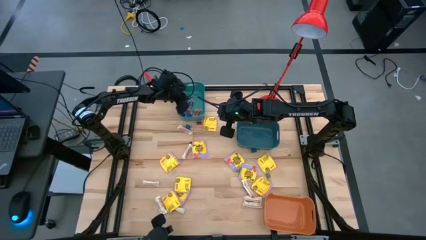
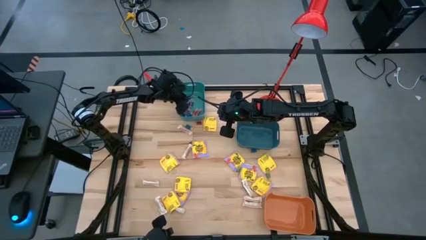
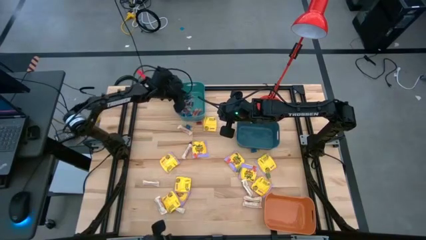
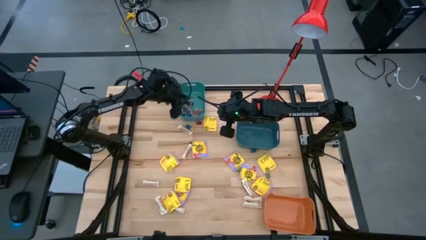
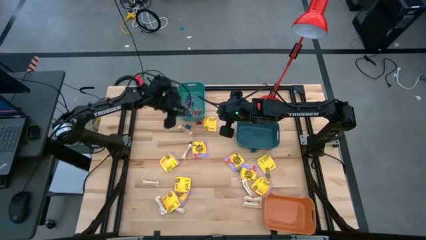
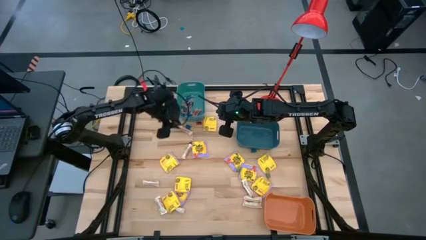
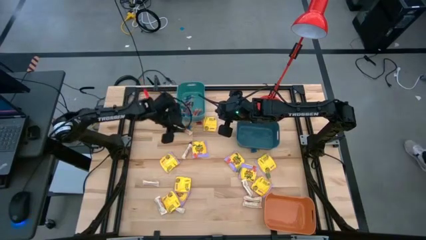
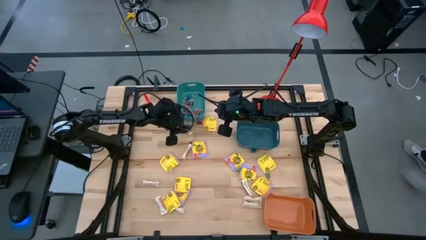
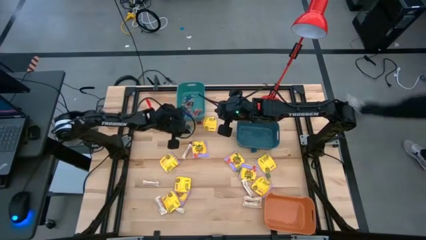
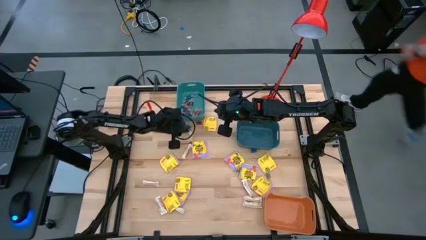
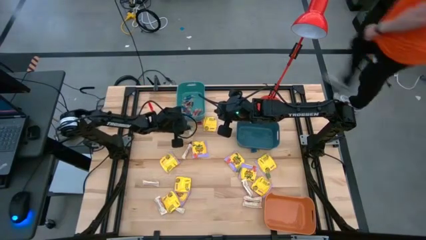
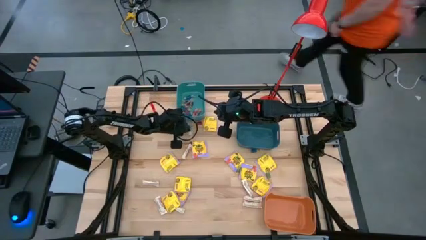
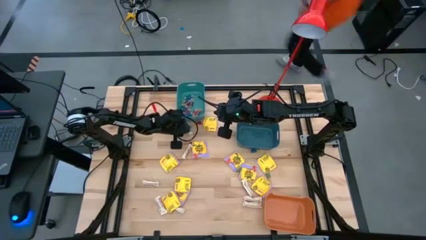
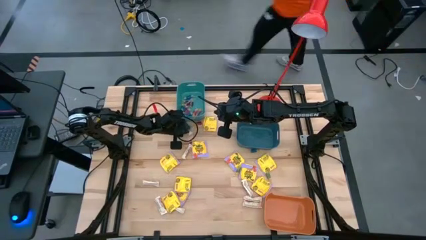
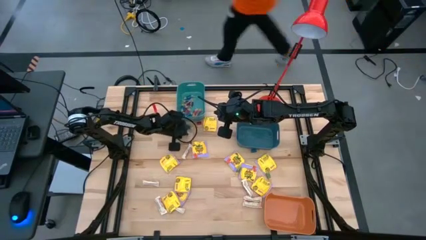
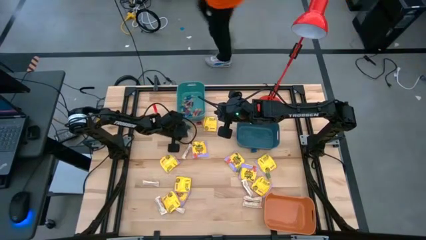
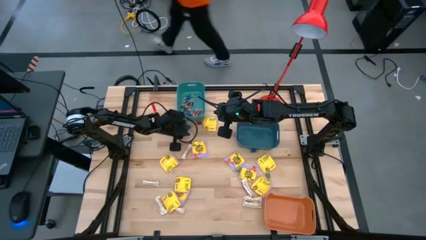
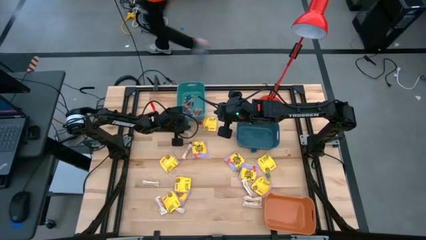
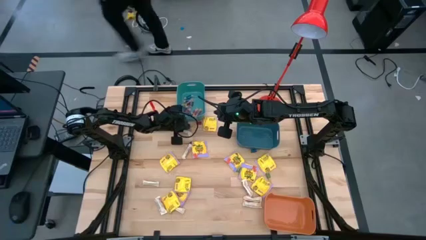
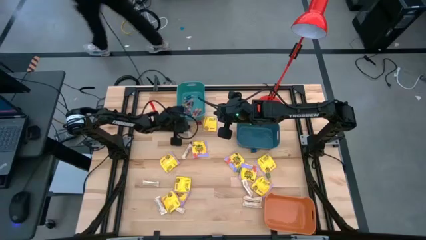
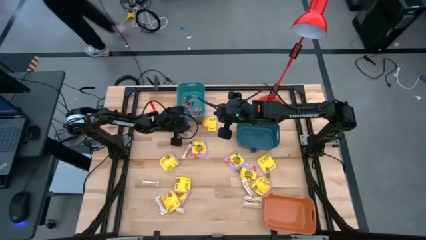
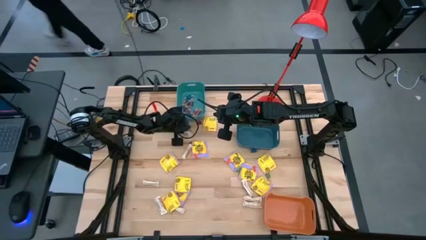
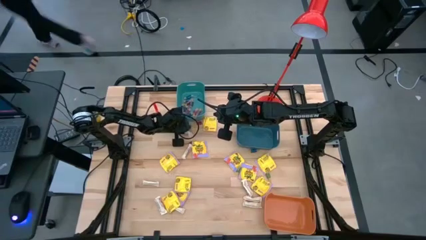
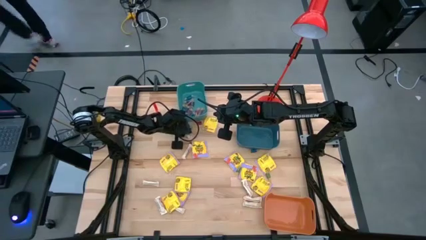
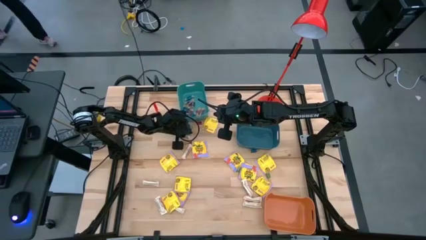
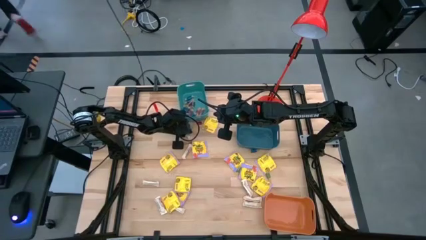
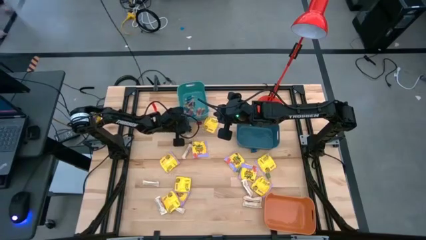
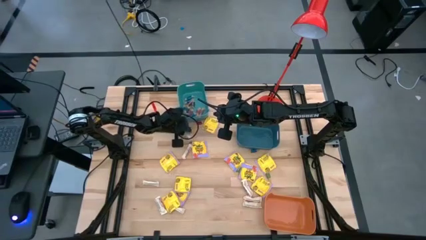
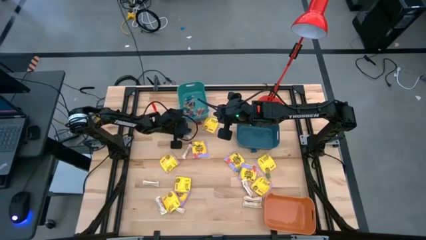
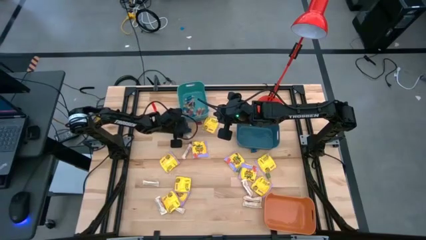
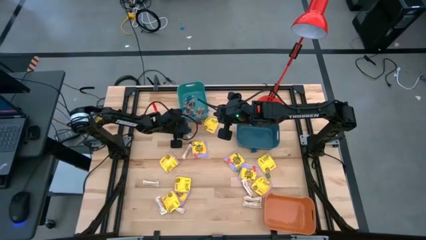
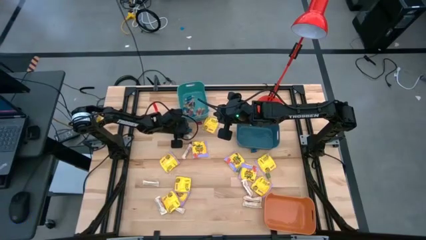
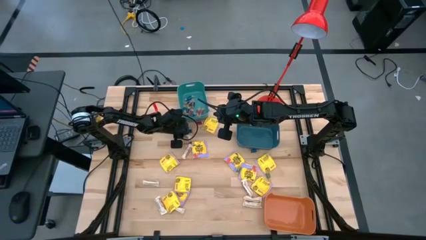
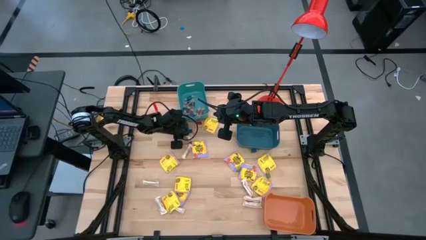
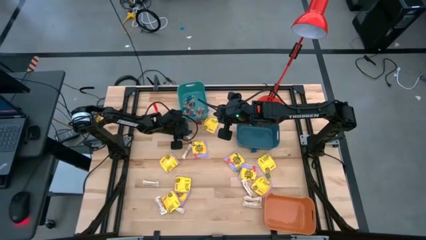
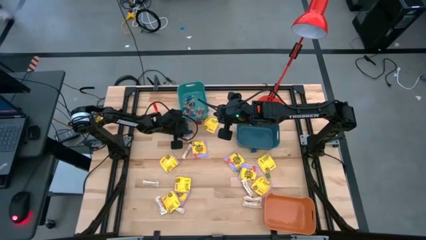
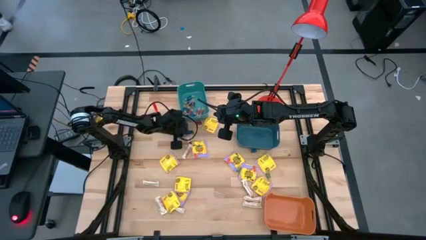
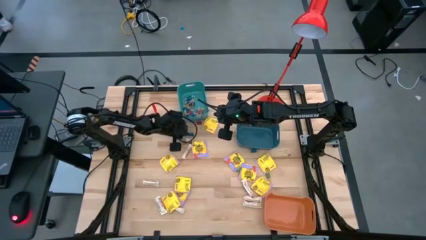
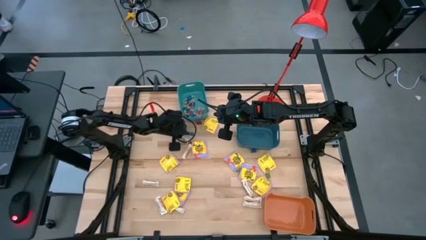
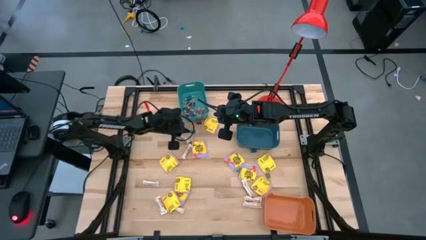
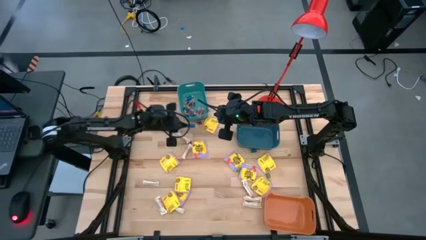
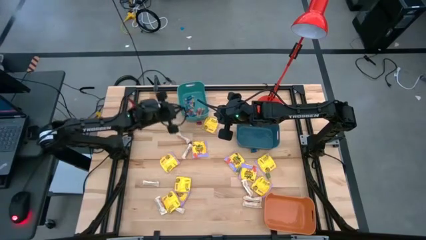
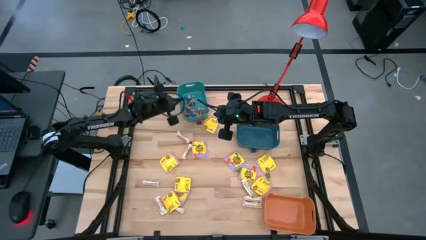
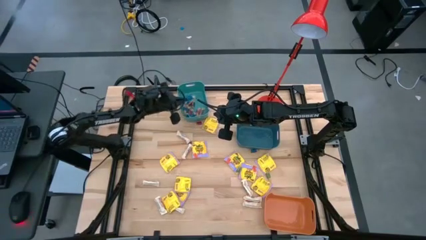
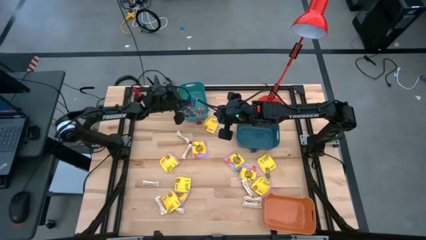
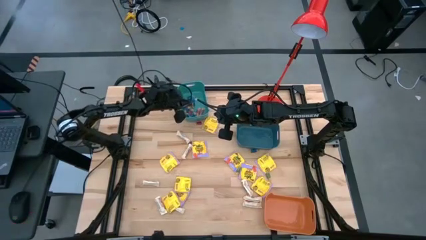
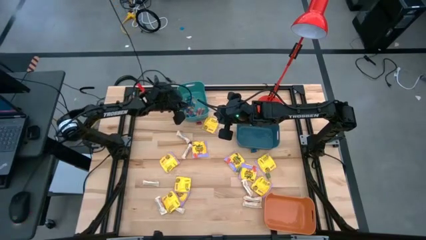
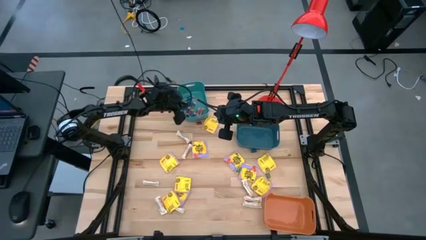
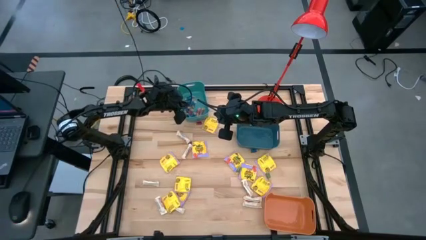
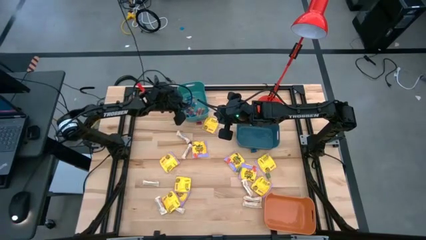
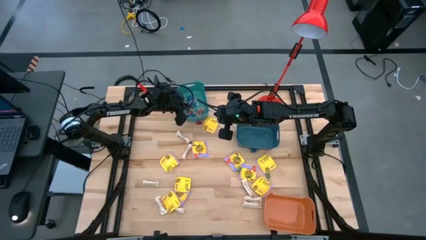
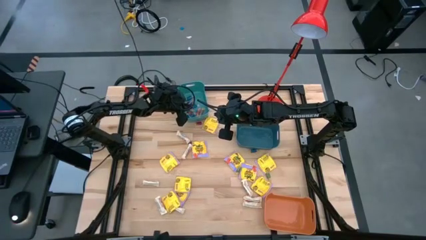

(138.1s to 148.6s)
Task: Sort candy
Put the blue candy into the green bin
